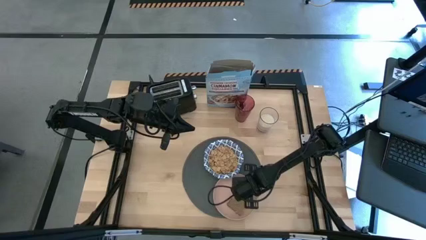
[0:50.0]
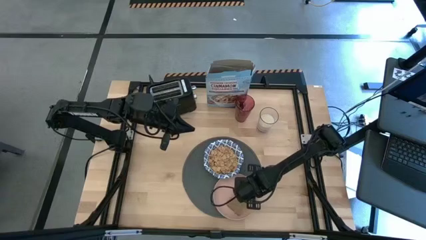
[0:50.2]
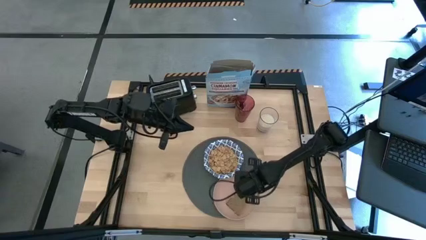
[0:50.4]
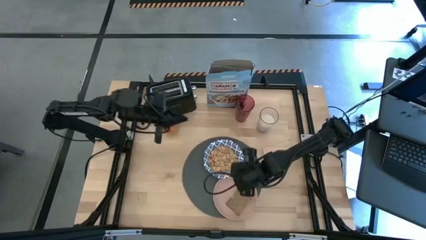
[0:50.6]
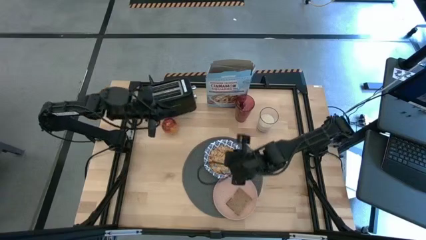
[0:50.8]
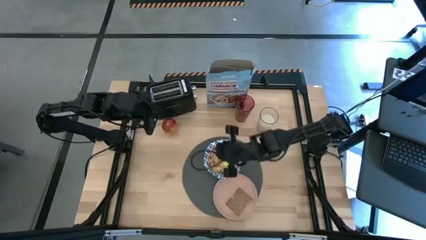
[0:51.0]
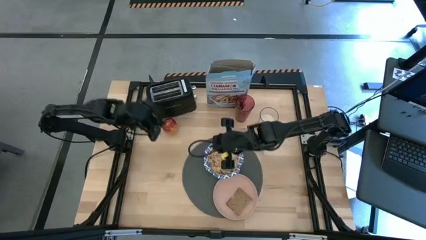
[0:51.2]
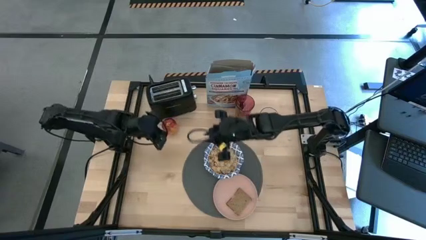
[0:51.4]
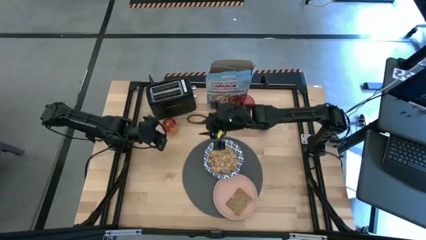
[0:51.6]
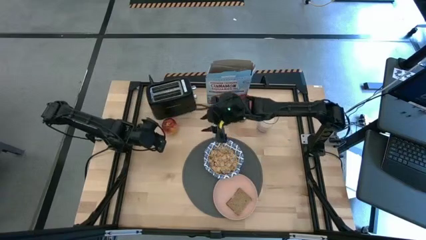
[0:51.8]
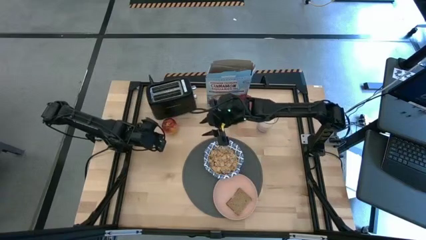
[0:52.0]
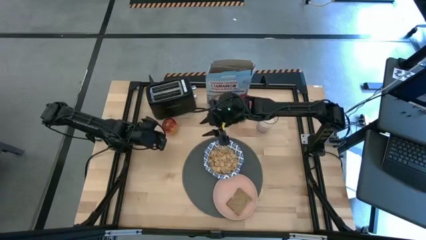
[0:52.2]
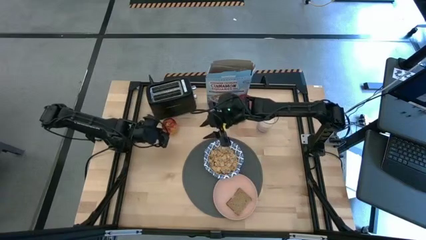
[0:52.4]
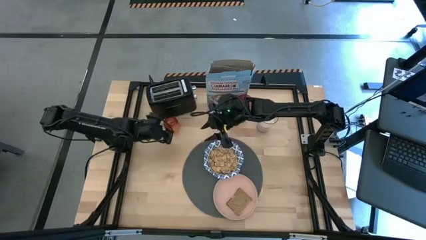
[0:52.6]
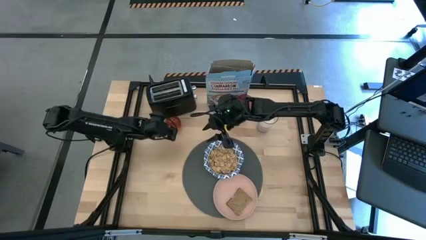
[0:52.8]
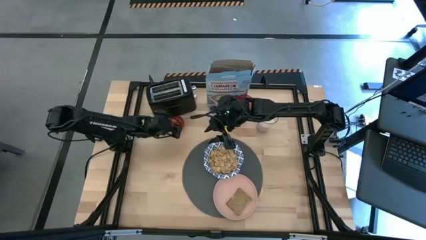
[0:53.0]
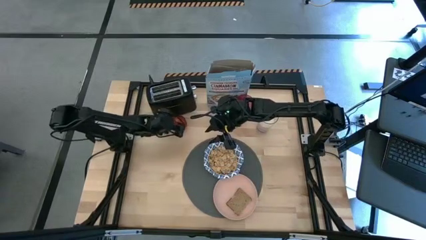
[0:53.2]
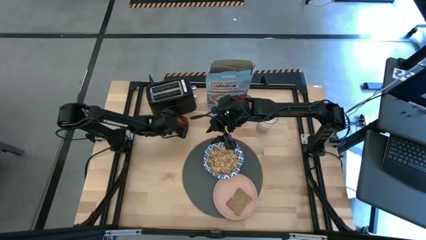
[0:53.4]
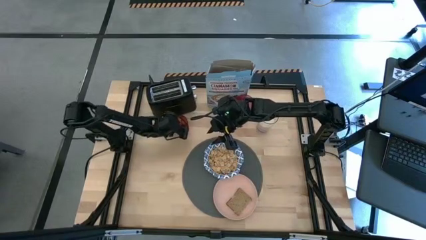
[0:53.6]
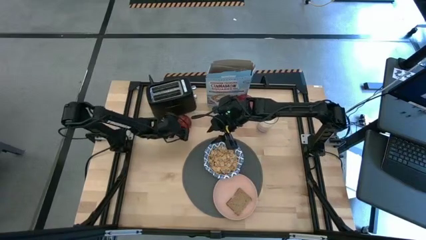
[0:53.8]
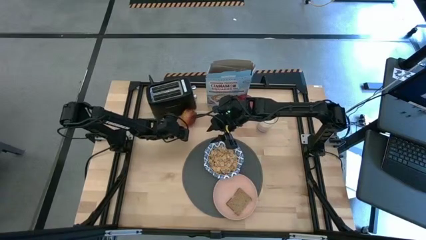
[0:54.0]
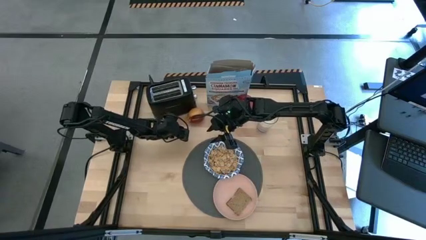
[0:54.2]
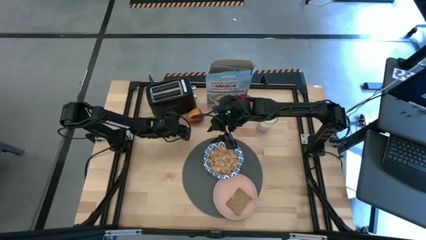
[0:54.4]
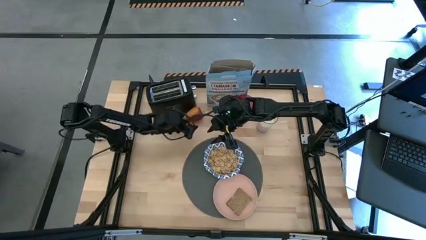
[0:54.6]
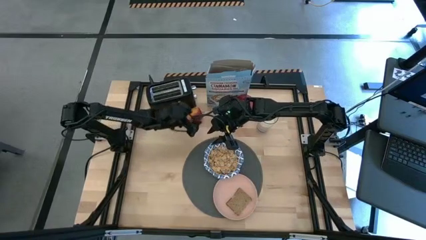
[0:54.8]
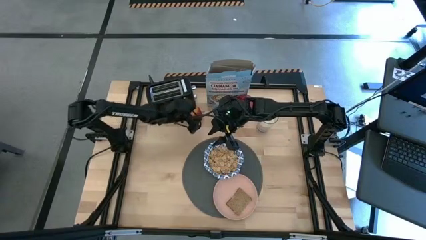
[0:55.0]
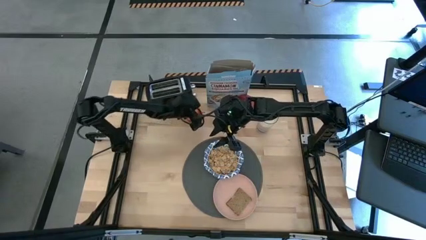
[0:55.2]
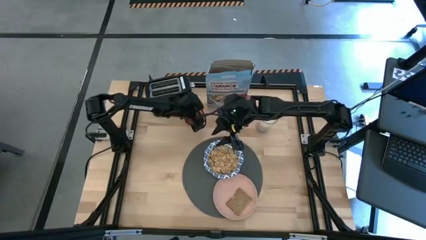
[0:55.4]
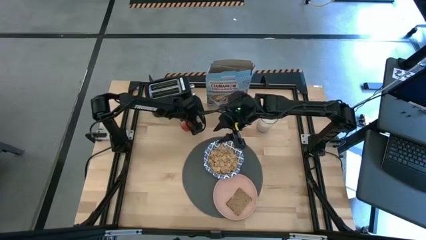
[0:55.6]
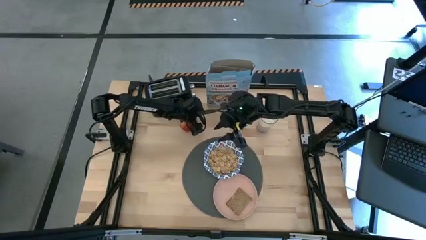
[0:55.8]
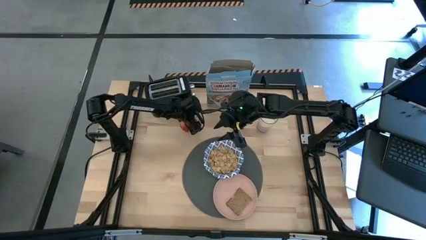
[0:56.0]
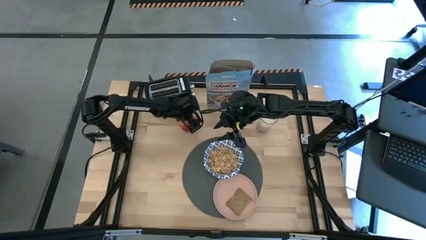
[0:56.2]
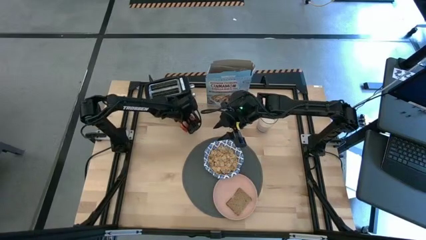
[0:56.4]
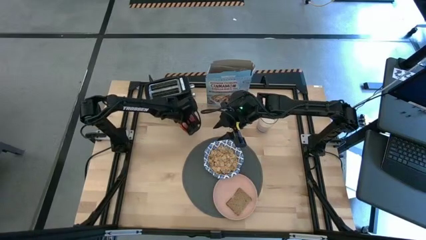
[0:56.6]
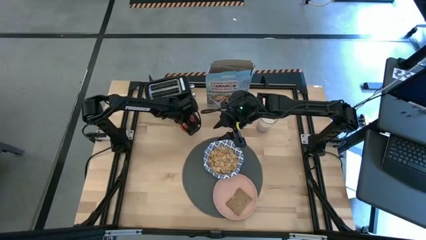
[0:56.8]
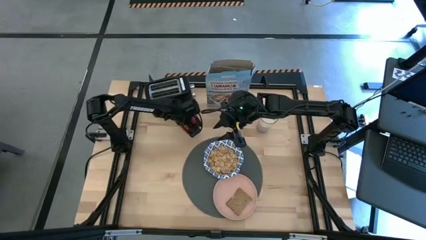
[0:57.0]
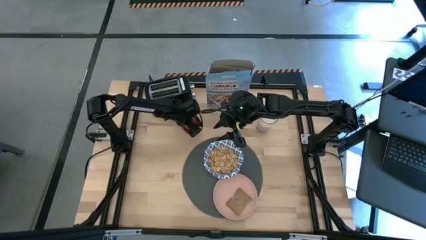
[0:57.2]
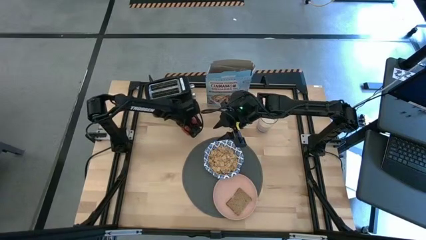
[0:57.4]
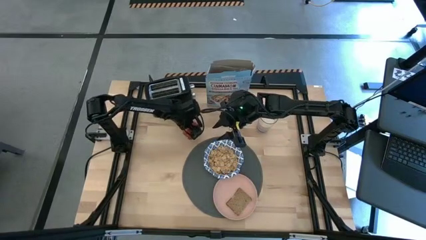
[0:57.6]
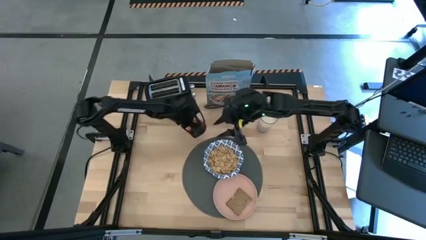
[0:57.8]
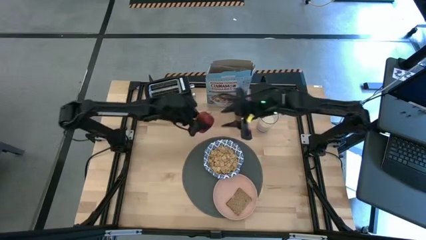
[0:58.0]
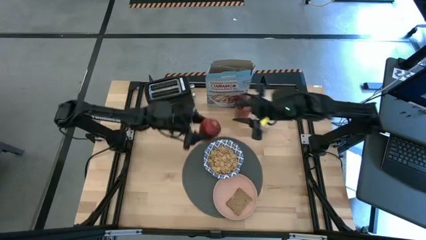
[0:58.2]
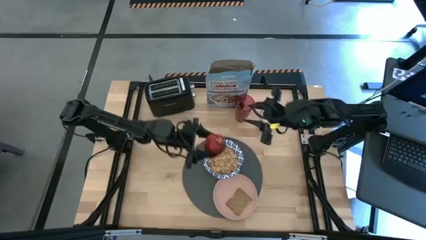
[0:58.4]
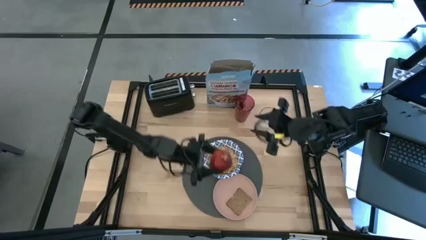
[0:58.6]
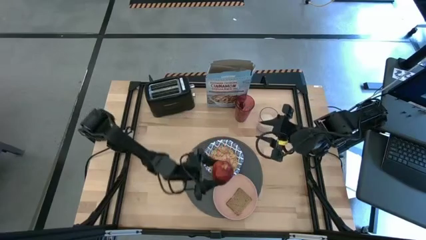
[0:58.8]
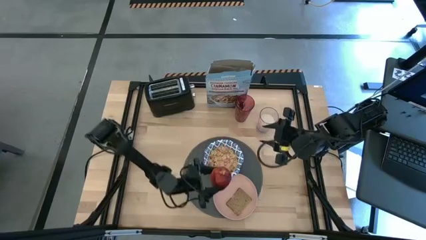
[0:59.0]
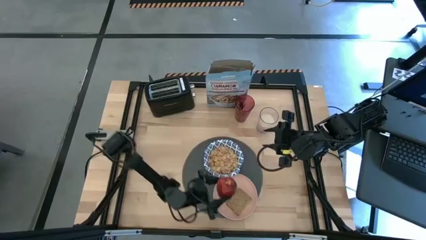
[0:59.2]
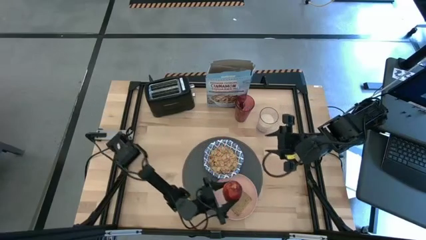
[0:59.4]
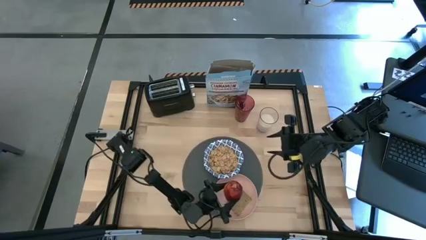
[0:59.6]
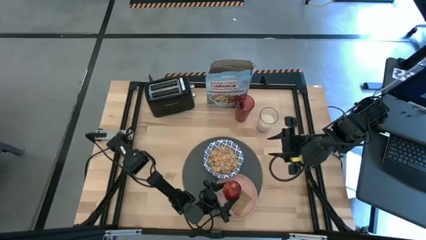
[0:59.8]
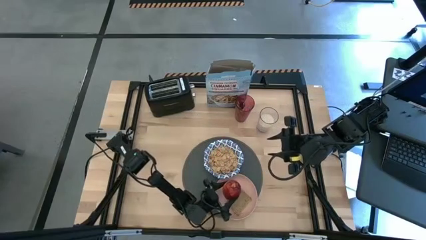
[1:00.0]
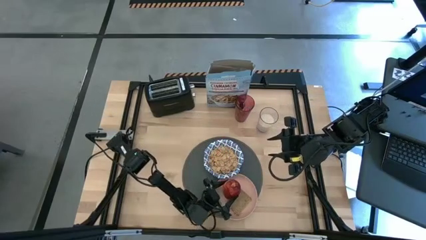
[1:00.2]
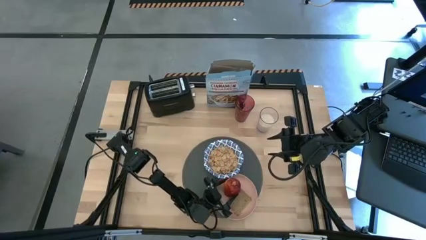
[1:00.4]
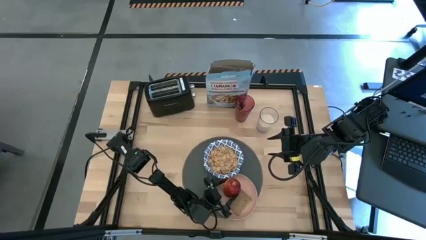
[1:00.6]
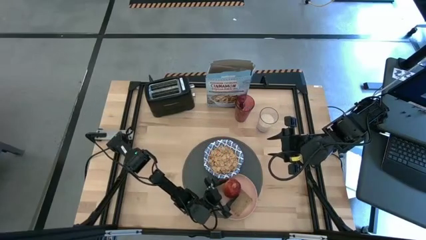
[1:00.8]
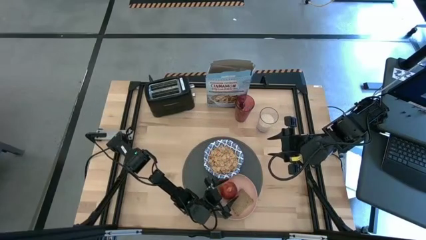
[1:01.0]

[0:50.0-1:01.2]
Task: Arrange a breakfast setting
Put the apple on the pink plate
